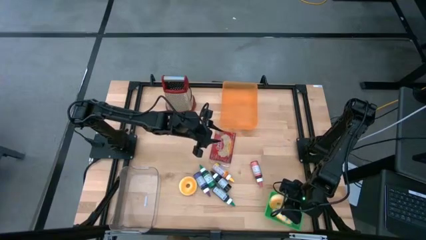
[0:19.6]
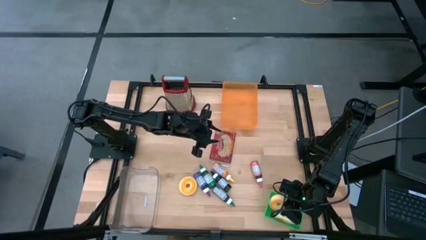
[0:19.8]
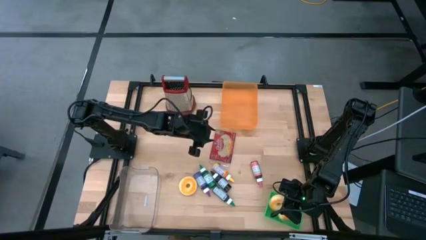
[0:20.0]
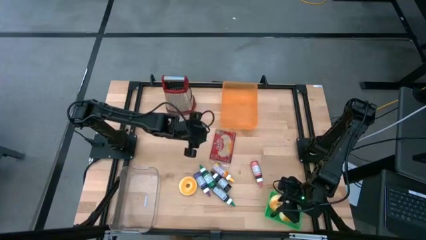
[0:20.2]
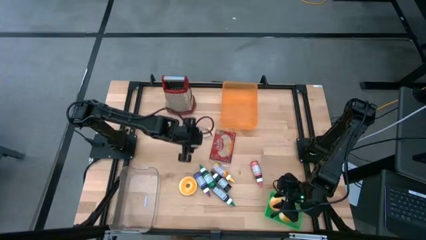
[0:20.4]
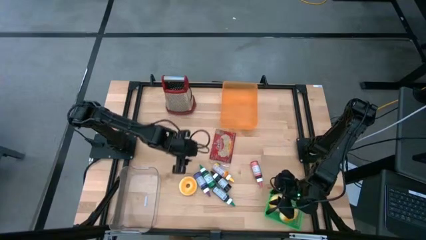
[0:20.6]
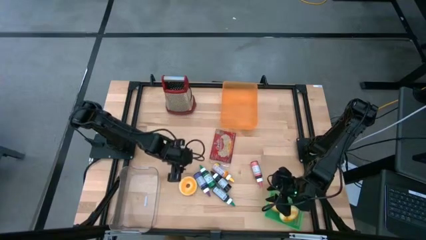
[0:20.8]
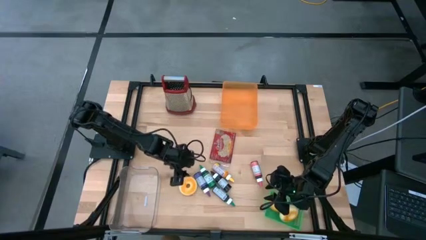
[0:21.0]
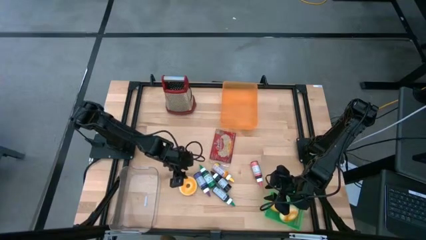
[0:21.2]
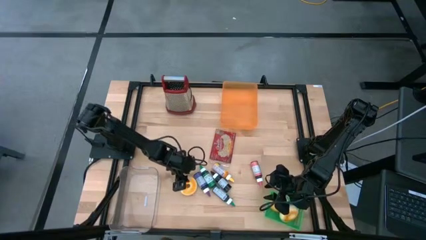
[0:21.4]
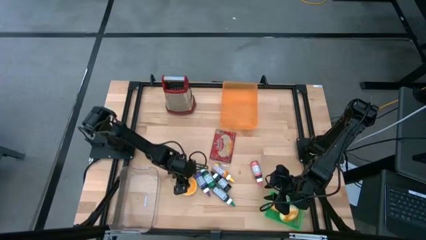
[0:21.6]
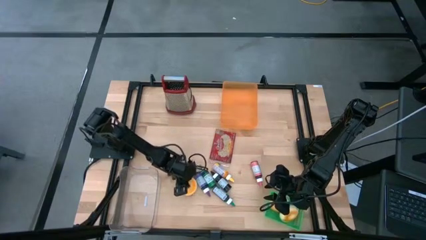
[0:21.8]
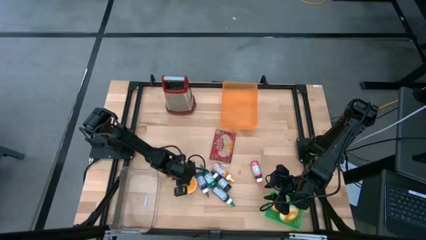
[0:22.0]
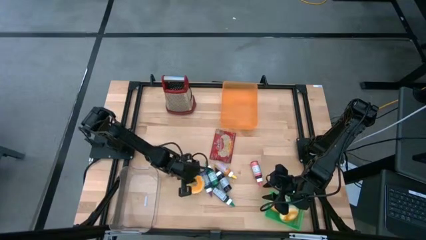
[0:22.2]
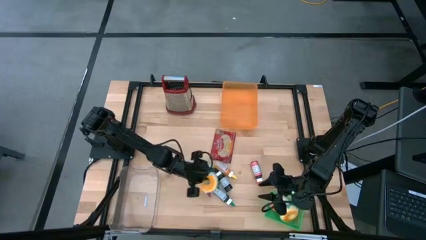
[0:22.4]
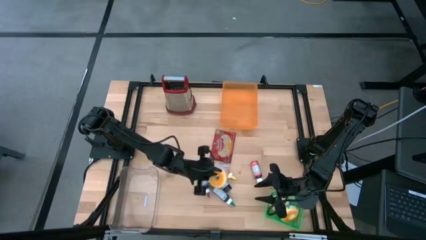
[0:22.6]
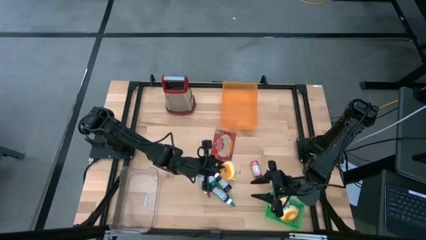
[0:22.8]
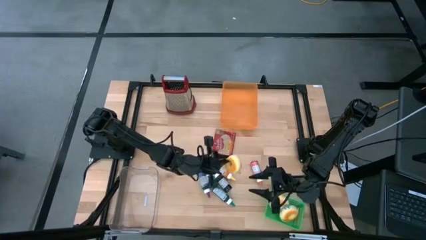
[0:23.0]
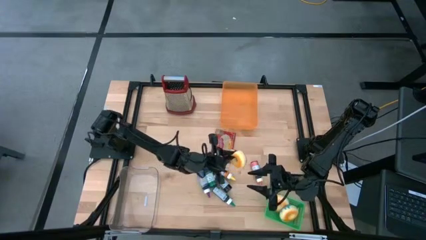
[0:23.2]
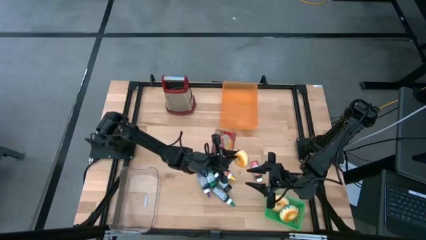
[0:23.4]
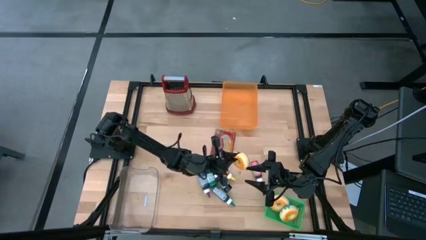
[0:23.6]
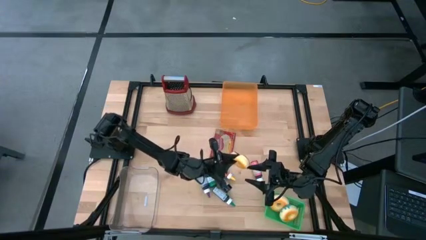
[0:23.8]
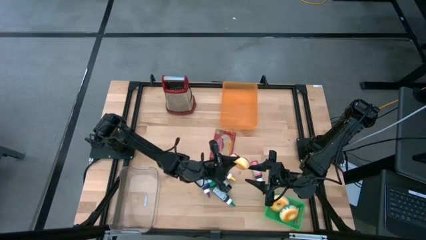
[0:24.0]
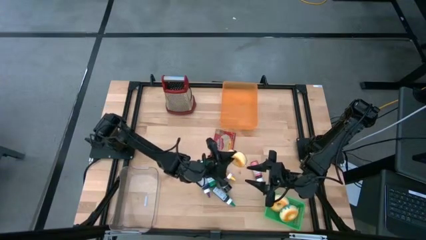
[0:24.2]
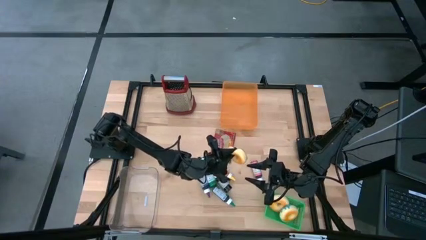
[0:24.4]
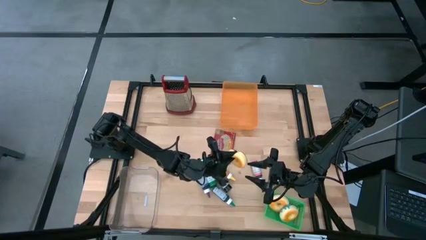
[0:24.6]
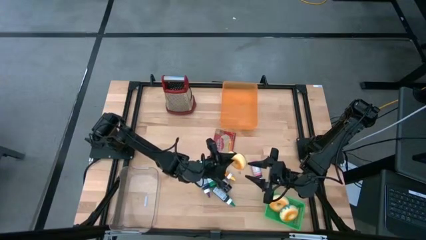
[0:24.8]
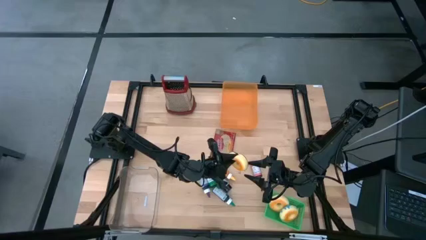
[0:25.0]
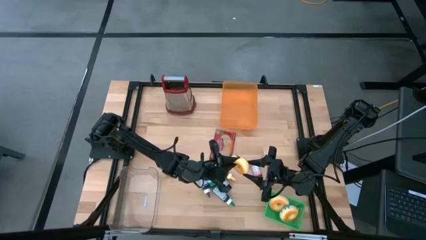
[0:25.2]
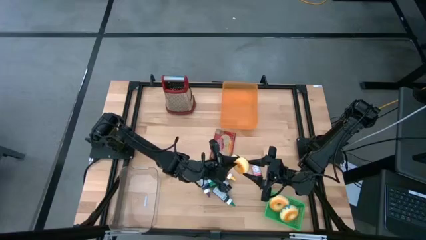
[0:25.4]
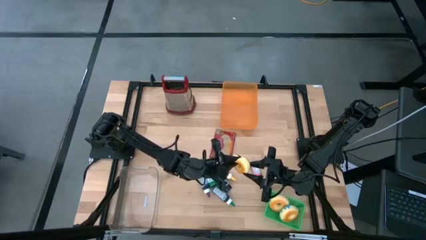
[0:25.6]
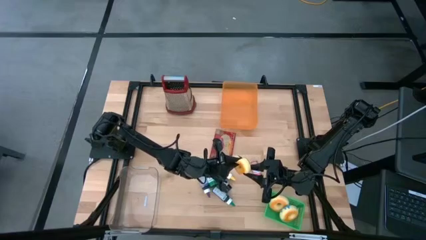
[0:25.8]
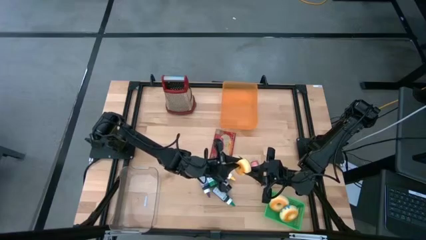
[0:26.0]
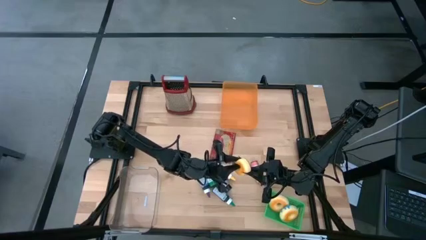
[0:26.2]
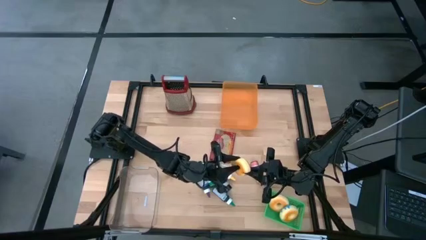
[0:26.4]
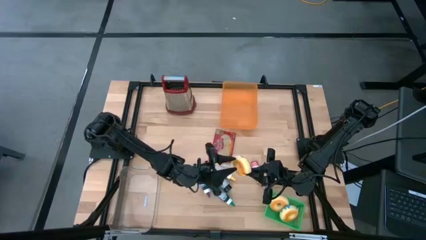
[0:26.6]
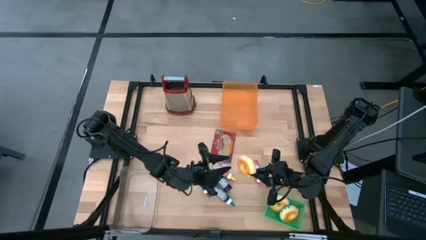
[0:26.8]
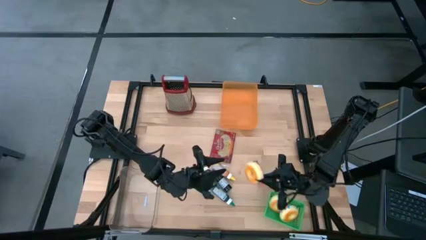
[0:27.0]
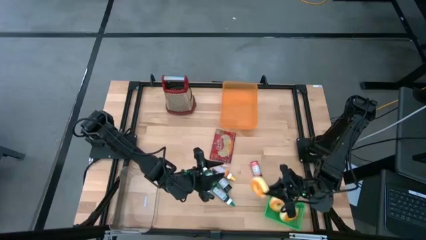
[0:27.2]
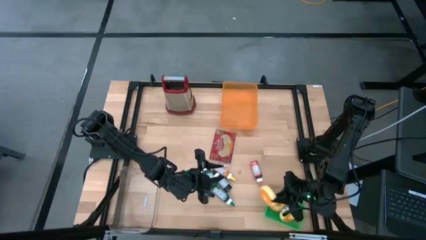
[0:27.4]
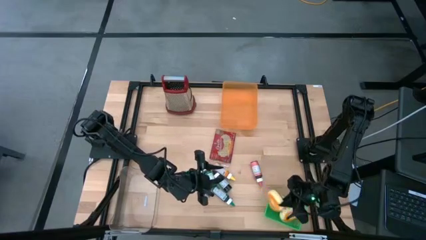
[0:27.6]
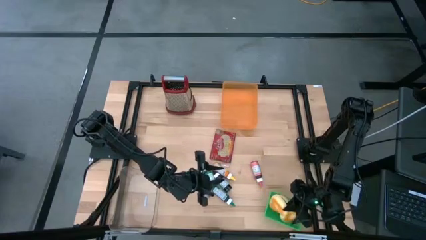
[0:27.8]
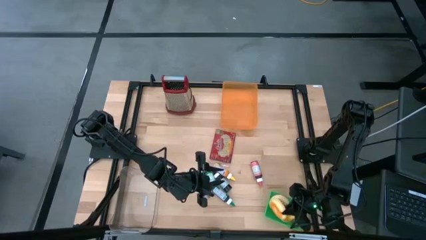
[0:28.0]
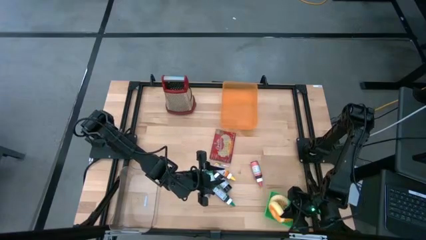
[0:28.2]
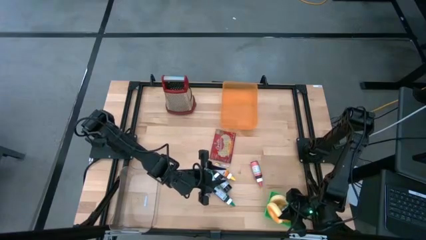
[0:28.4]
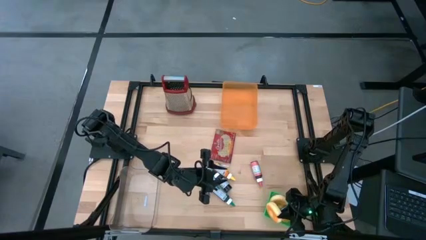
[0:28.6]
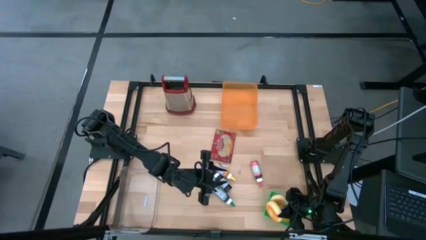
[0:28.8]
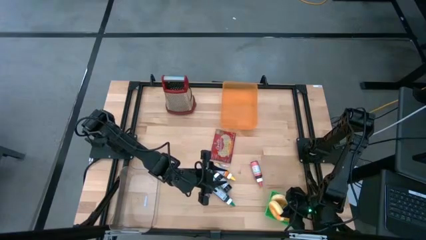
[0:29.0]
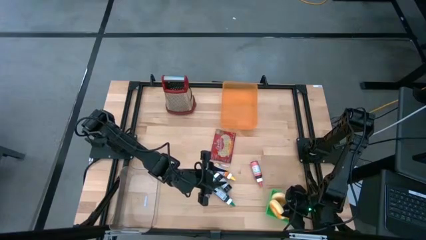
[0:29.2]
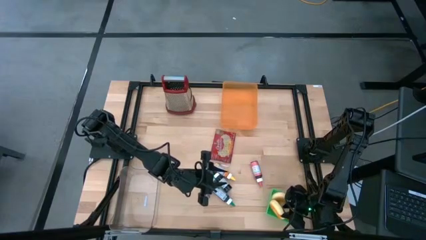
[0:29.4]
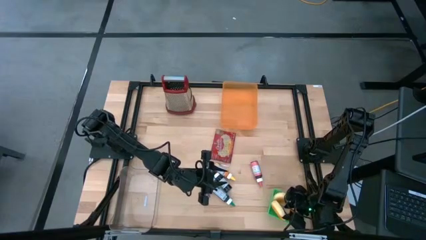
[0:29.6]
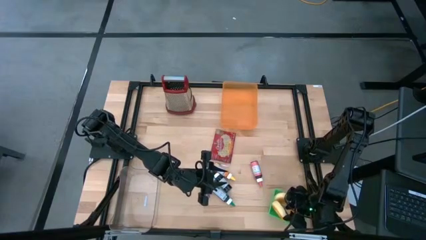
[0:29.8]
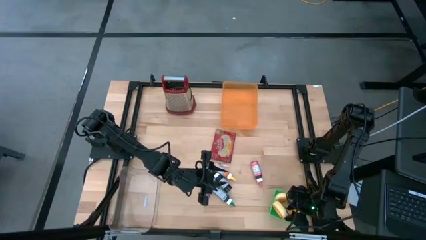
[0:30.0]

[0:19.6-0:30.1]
Put the brown donut into the green bin

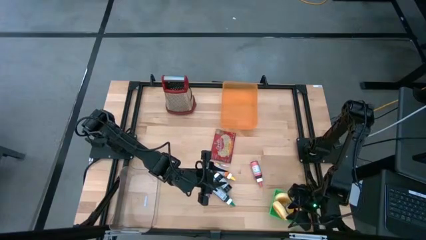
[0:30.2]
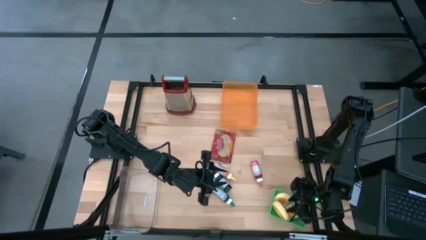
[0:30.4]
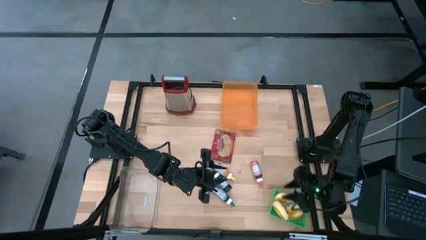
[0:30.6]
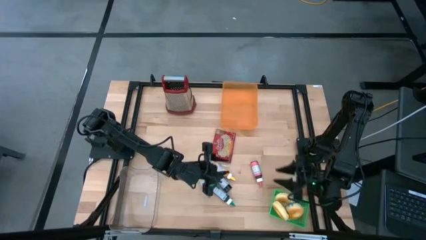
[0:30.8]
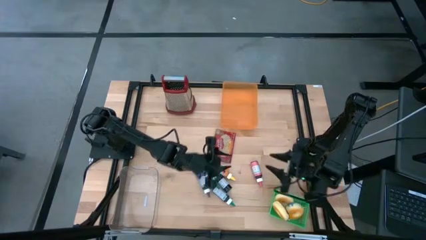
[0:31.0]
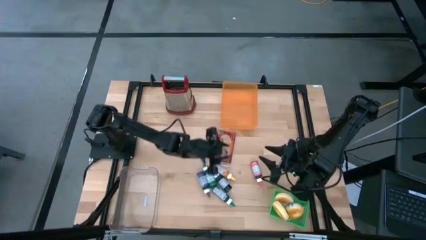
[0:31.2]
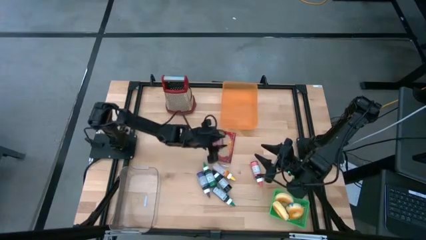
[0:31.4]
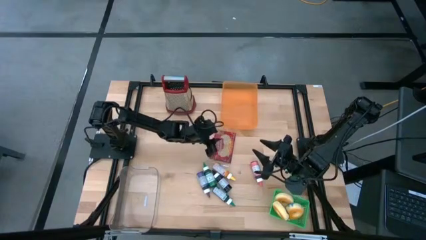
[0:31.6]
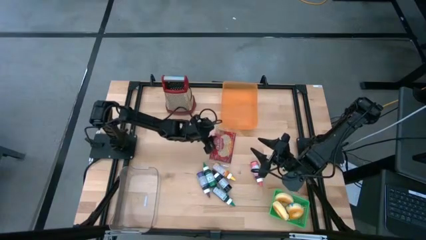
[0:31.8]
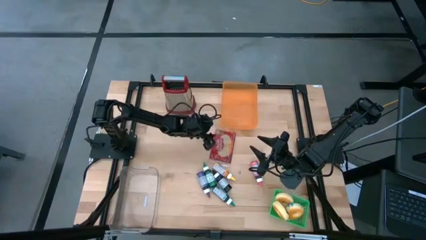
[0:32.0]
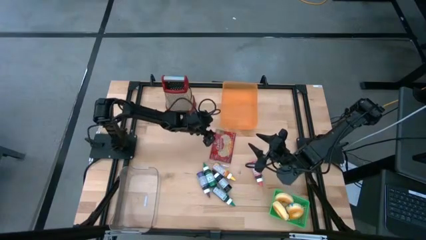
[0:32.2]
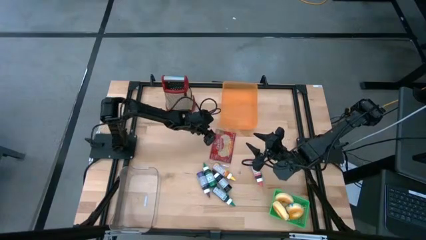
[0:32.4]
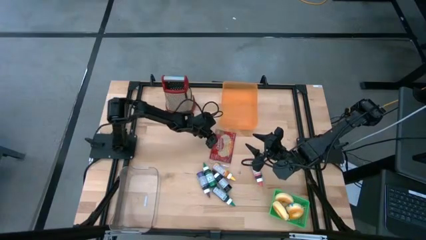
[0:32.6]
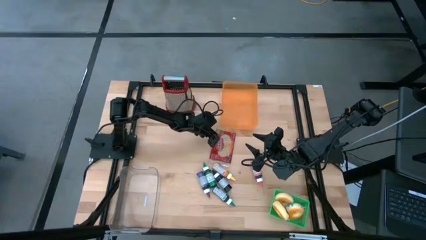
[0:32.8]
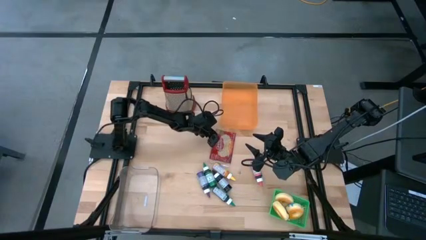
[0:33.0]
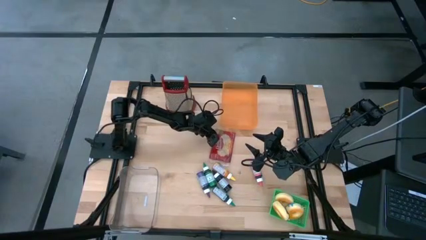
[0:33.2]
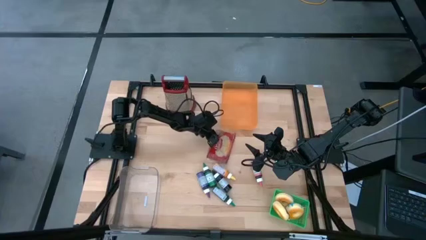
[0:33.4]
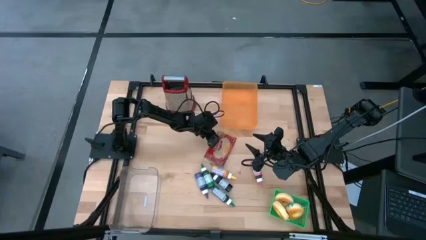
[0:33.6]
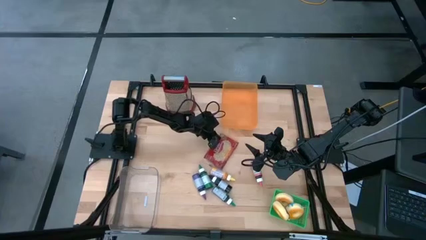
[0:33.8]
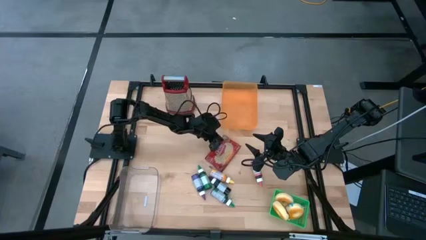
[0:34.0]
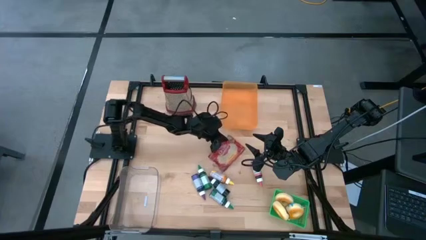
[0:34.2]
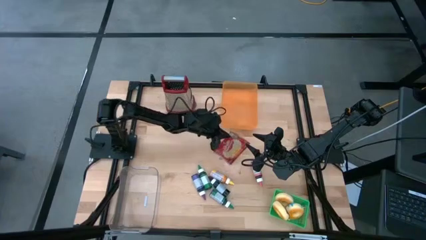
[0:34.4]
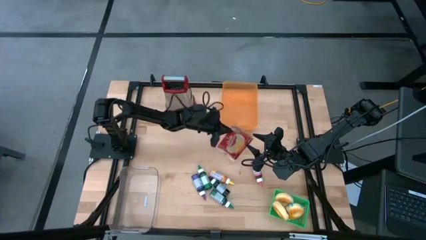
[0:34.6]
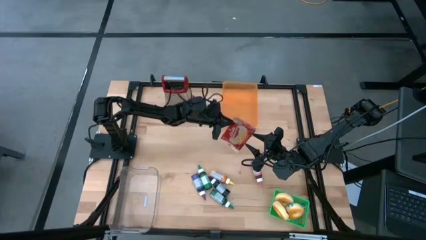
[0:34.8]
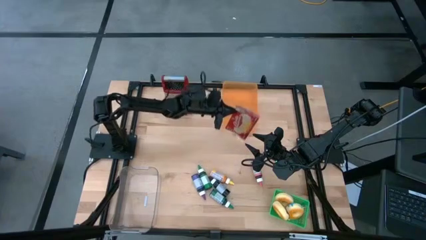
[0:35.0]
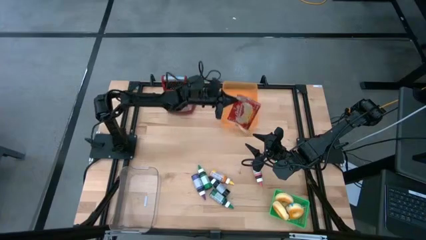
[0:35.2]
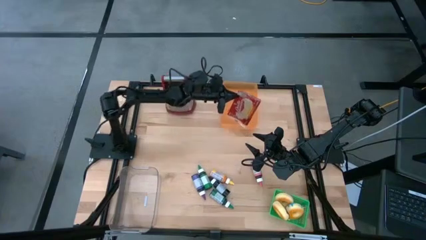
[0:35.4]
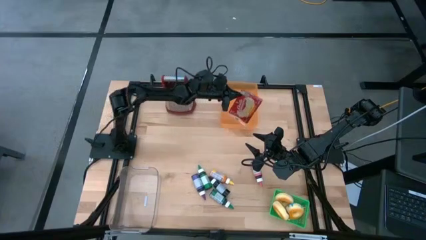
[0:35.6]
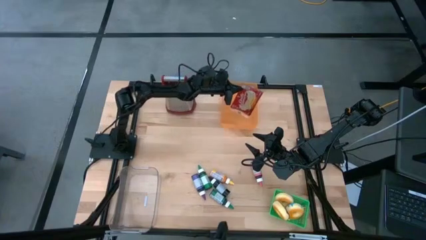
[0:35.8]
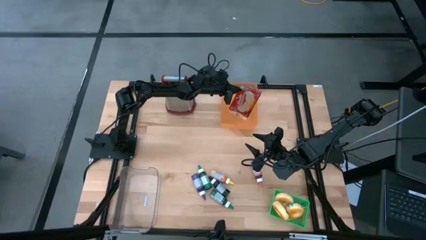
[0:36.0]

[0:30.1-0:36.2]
Put the red popcorn bag into the orange bin
